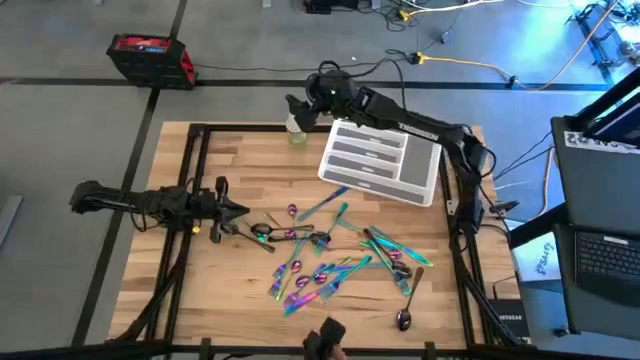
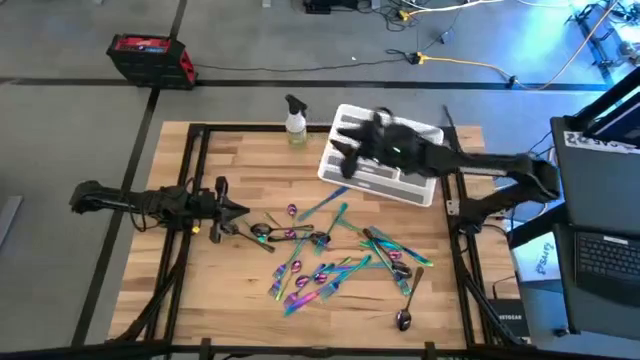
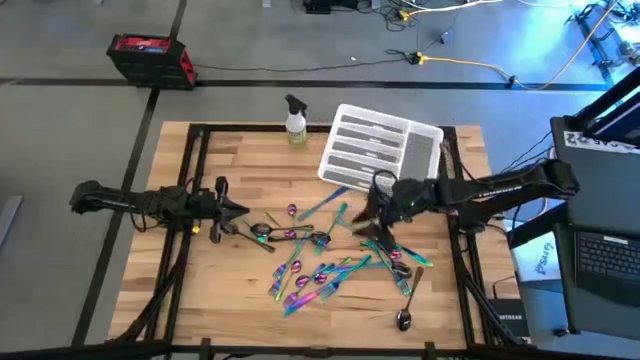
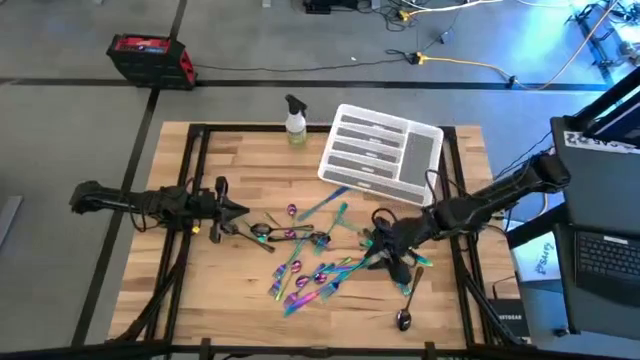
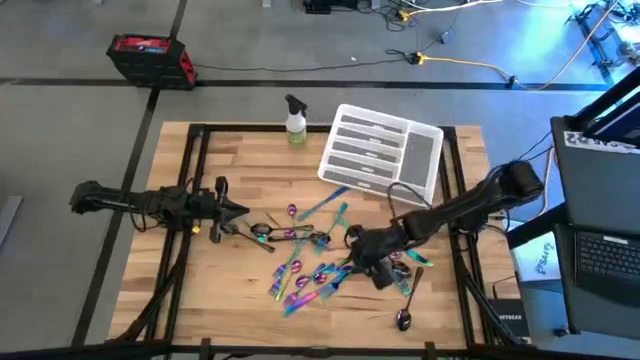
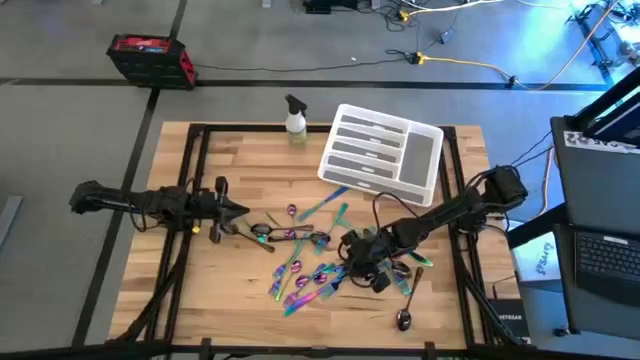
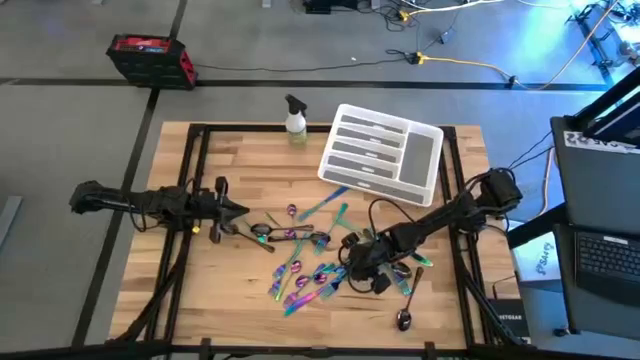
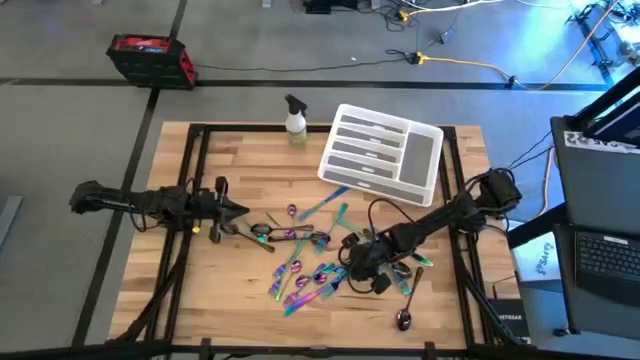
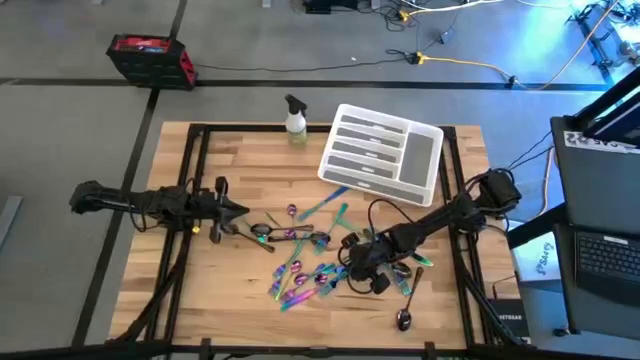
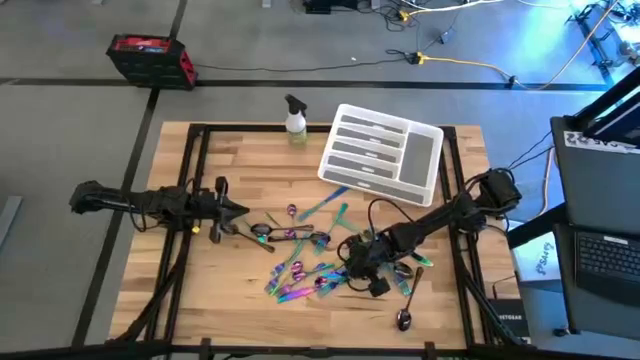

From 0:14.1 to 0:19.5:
Task: Sort silverware
Put the blue fork on the white silverware tray

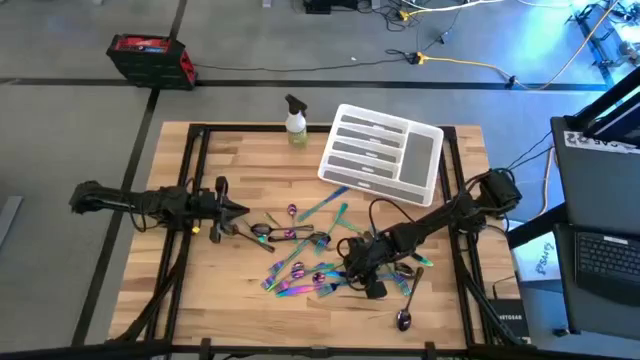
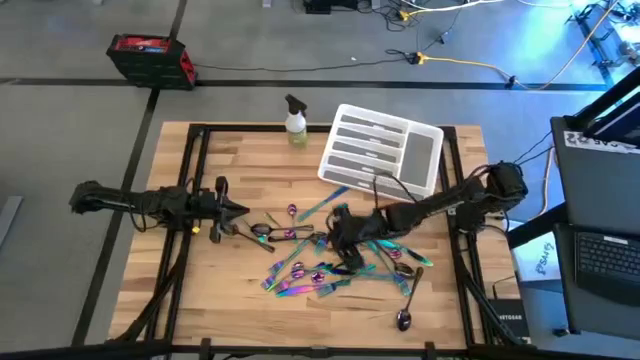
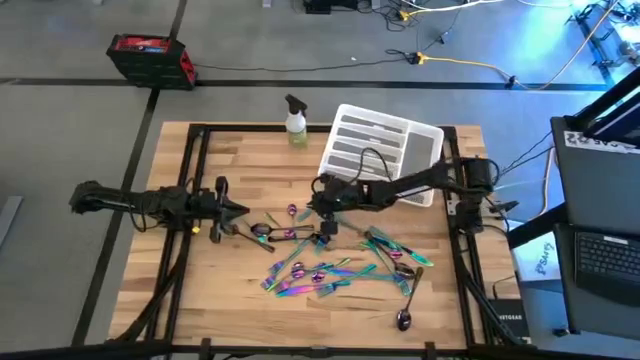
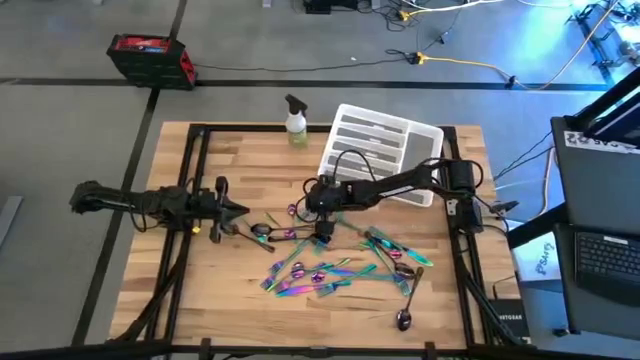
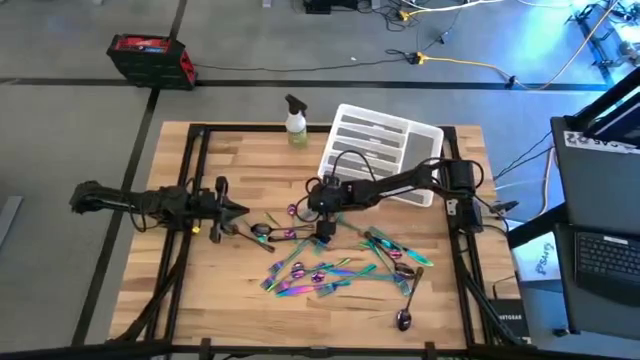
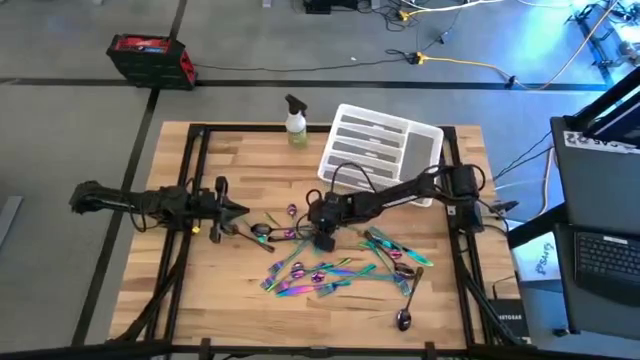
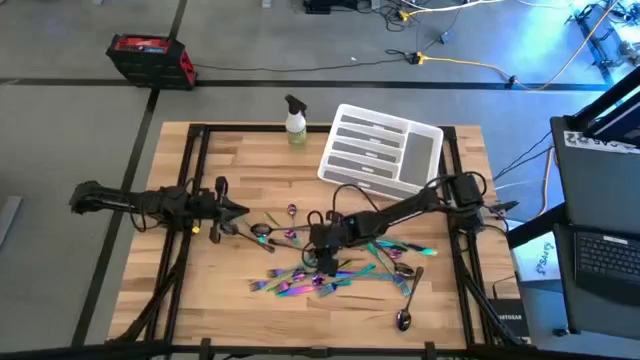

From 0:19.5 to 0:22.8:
Move the blue knife to the center of the table

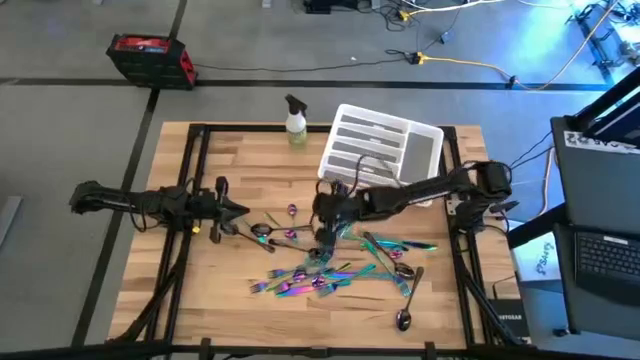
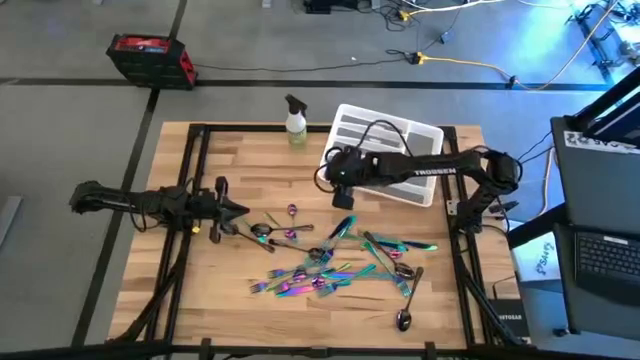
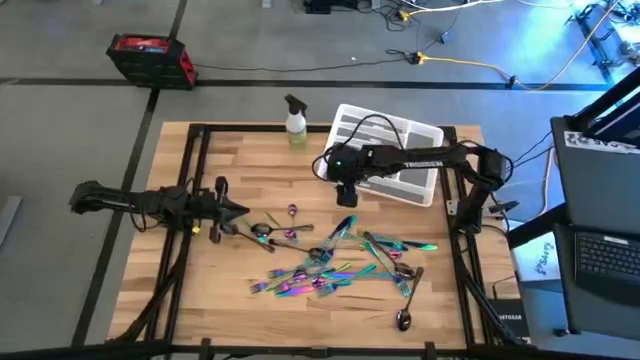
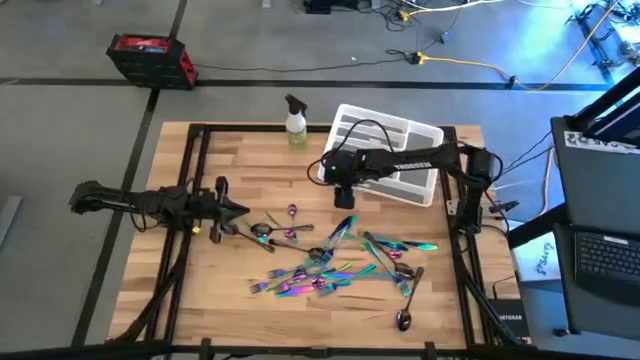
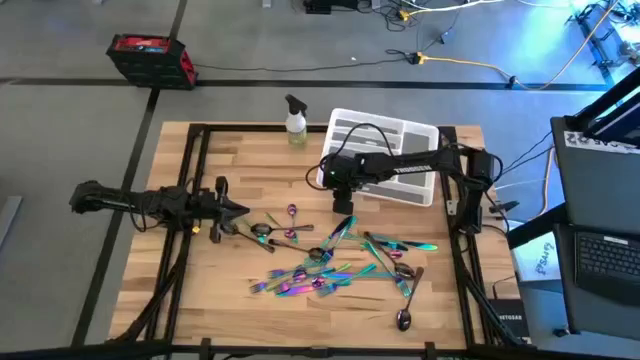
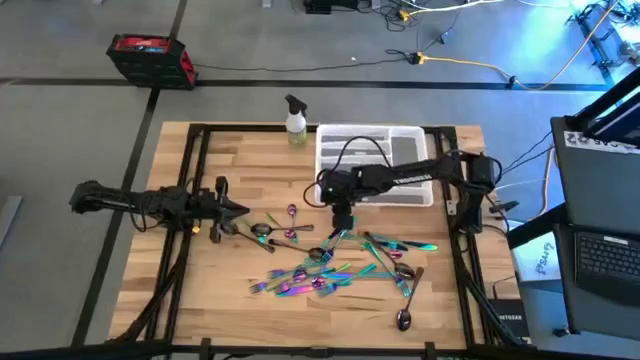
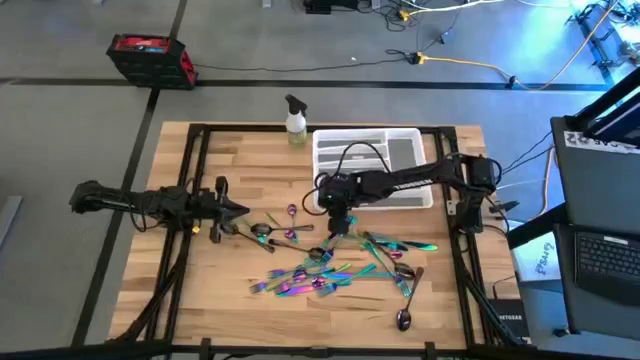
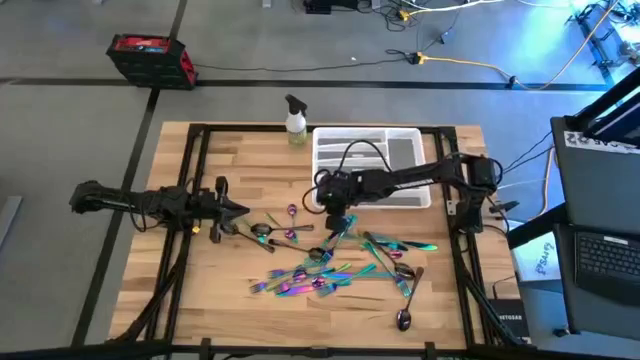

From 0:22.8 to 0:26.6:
Adjust the white white silverware tray on the table

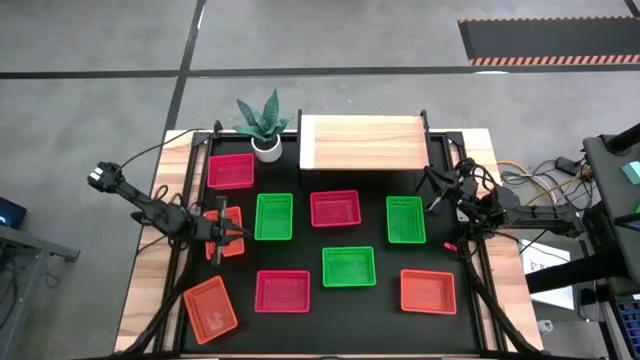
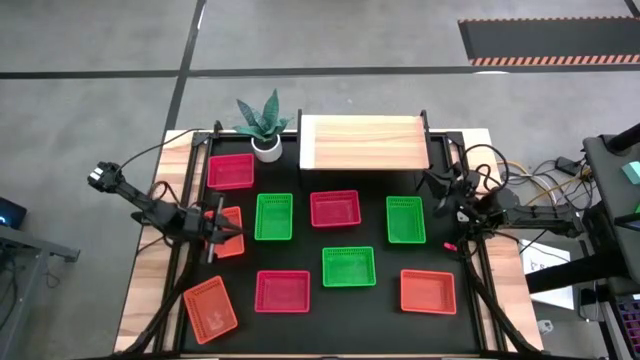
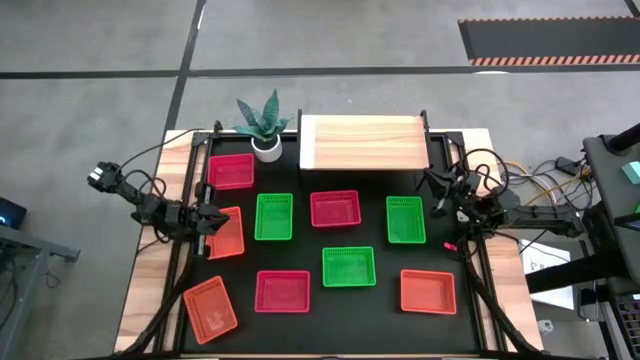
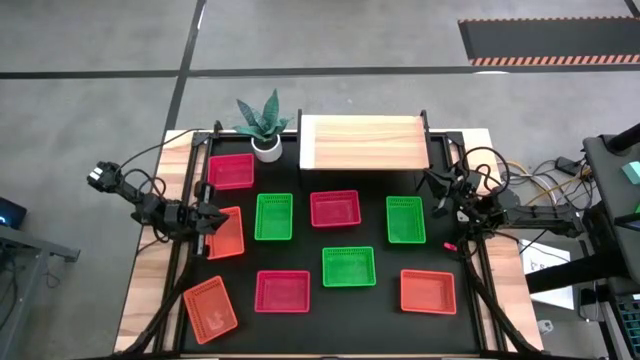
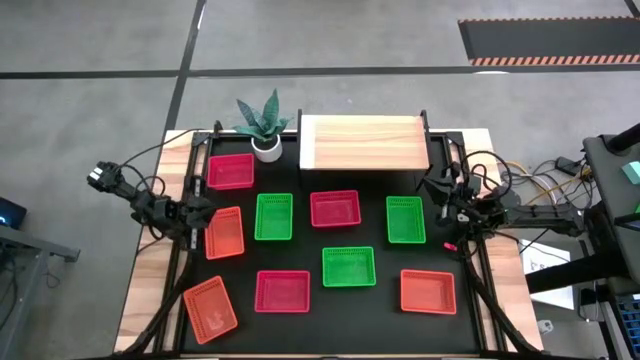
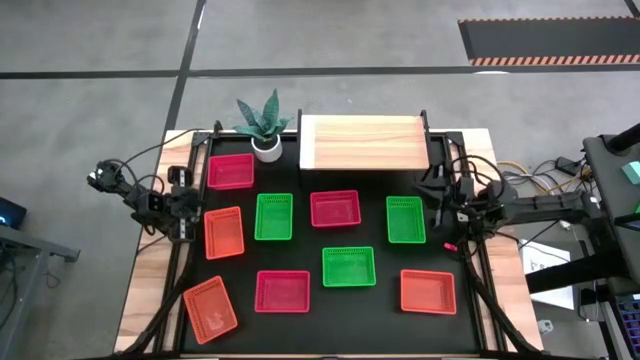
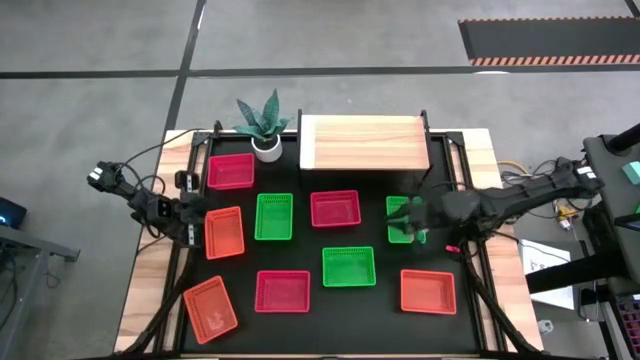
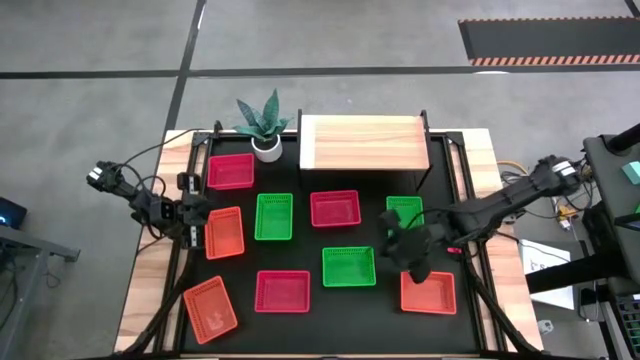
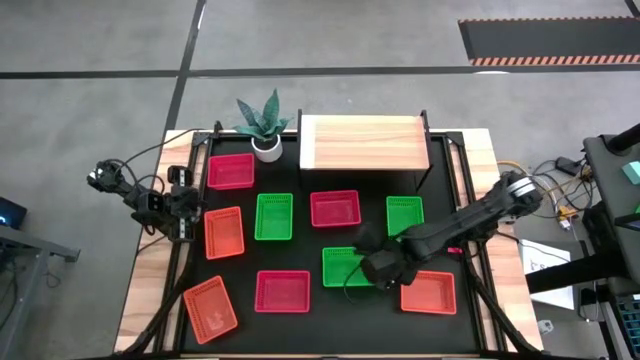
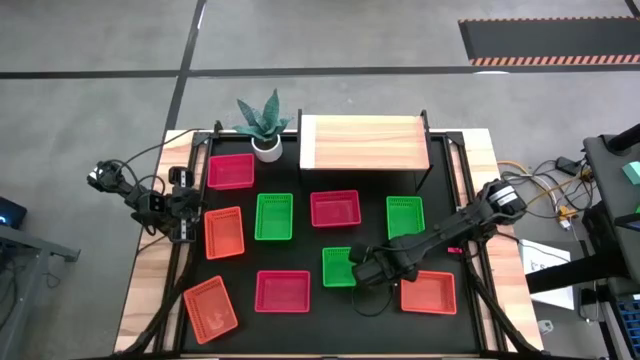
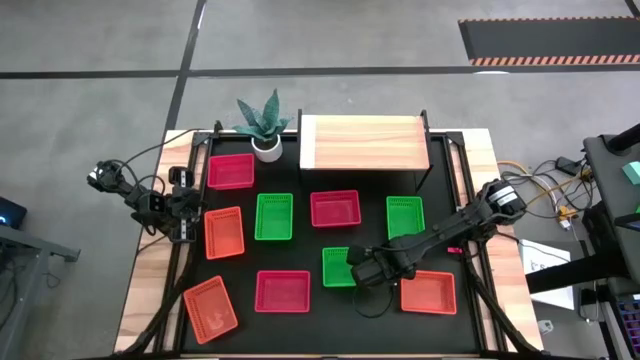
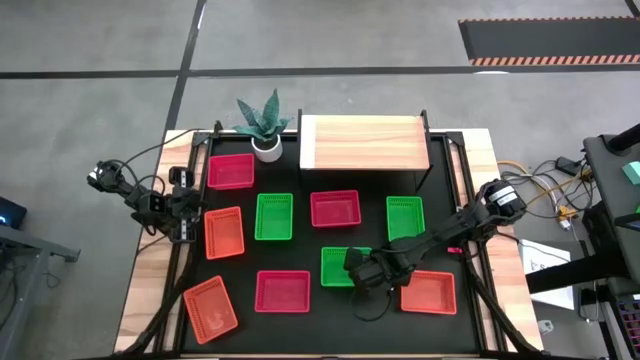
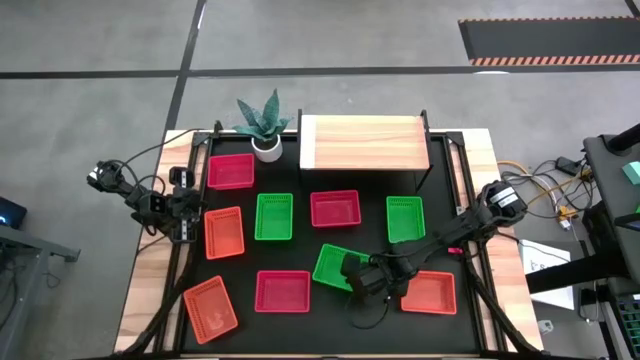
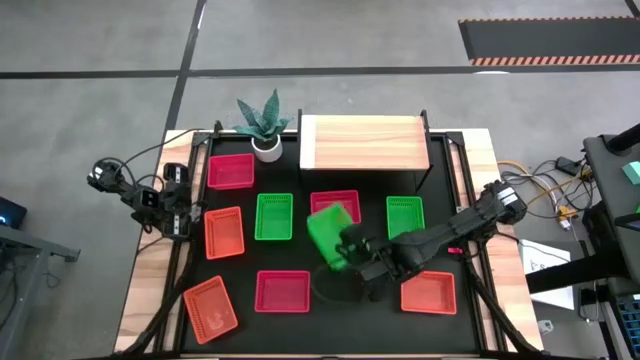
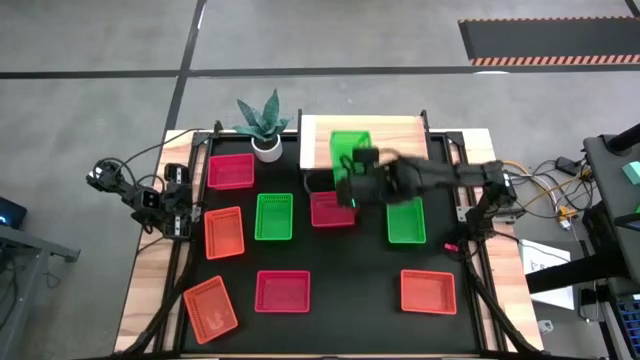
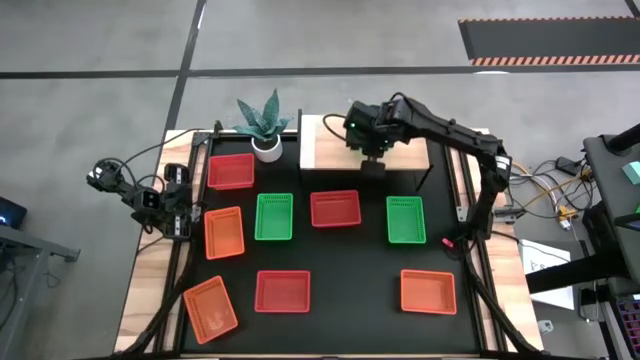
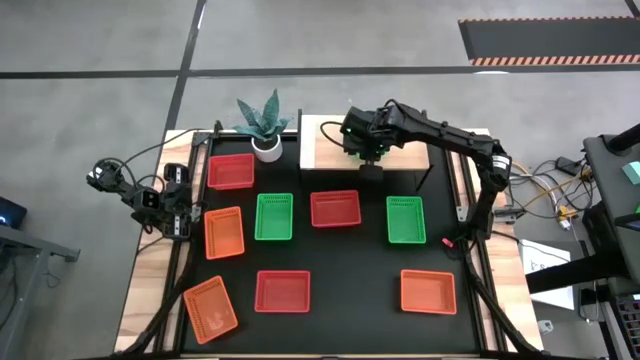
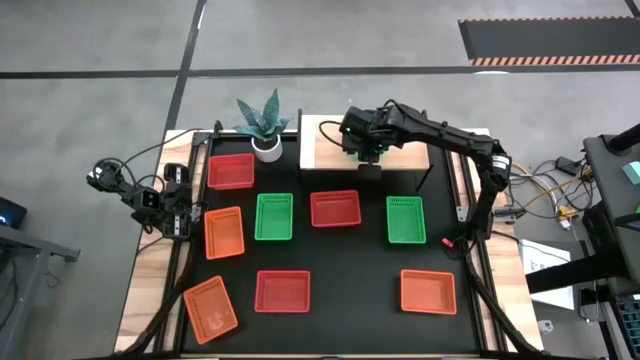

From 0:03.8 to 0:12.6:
Task: Stack baskets on shelf by color
Put the middle green bin on the shelf
